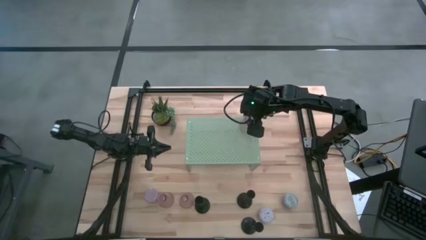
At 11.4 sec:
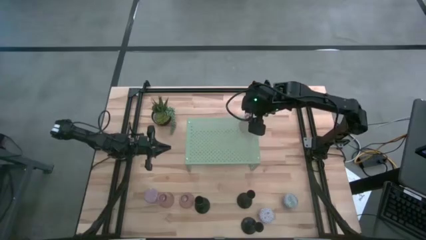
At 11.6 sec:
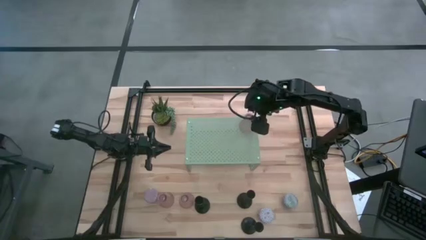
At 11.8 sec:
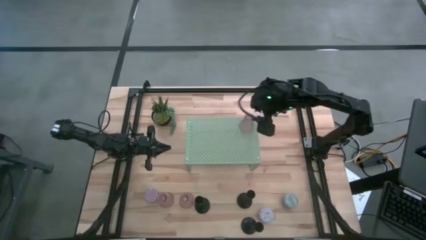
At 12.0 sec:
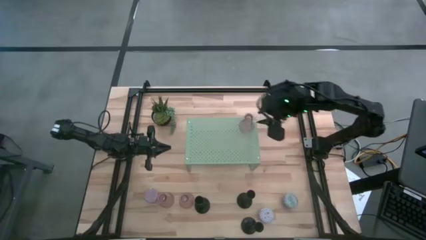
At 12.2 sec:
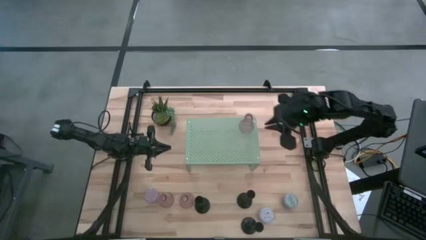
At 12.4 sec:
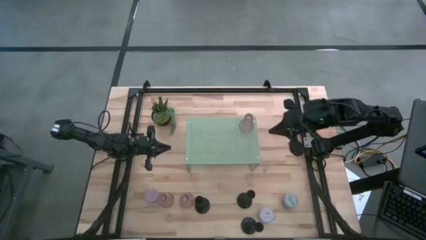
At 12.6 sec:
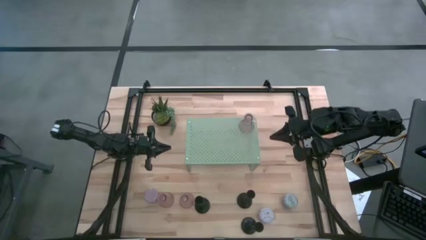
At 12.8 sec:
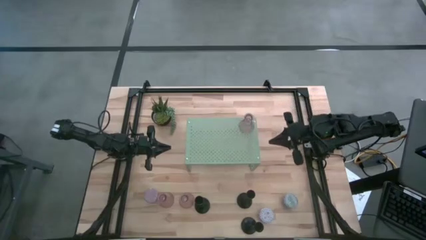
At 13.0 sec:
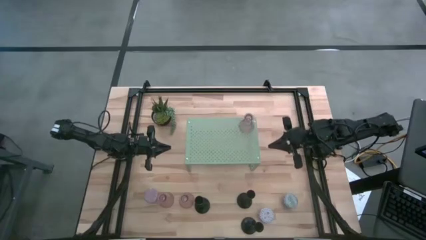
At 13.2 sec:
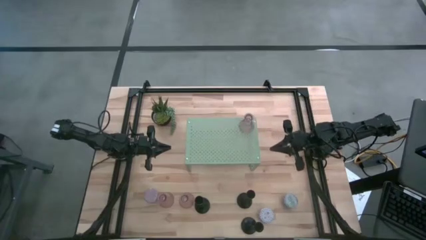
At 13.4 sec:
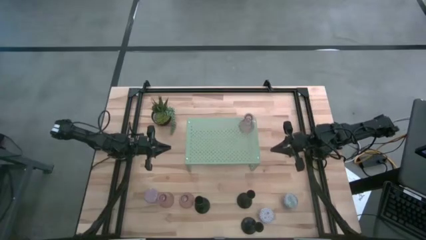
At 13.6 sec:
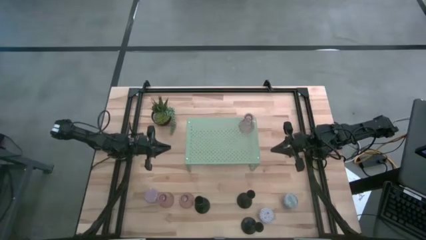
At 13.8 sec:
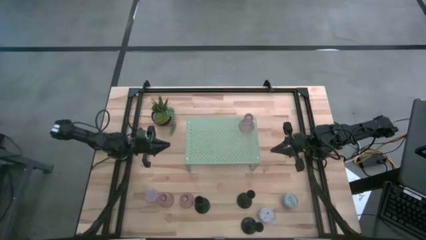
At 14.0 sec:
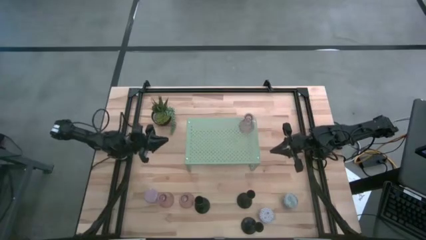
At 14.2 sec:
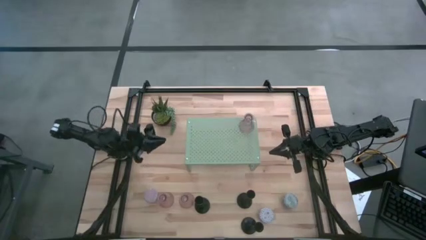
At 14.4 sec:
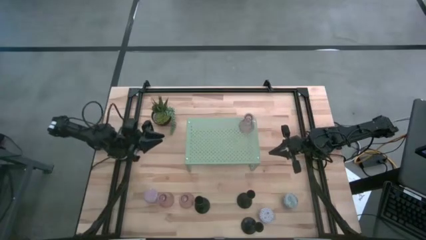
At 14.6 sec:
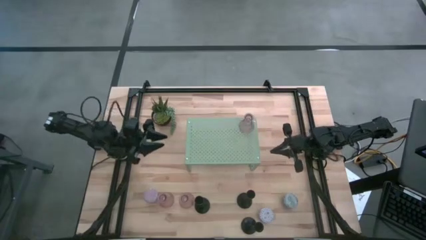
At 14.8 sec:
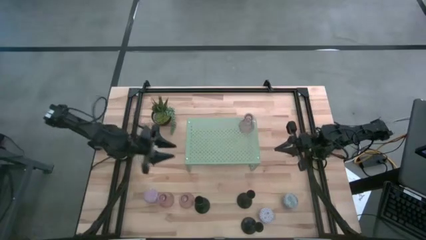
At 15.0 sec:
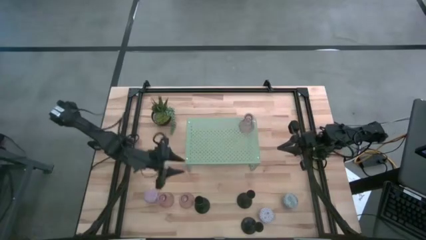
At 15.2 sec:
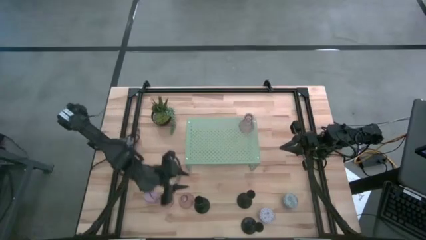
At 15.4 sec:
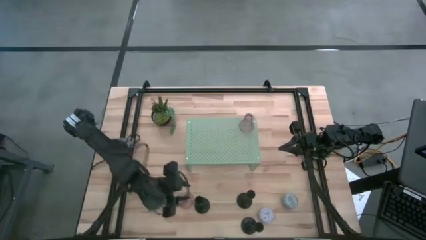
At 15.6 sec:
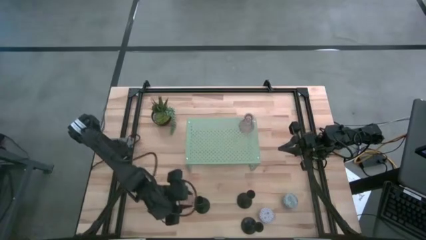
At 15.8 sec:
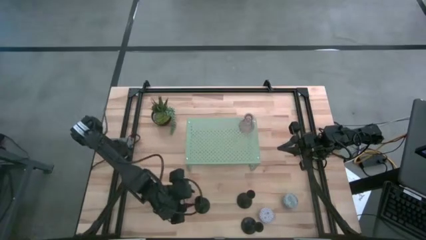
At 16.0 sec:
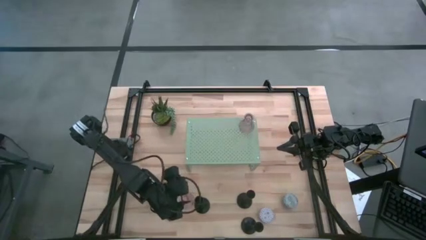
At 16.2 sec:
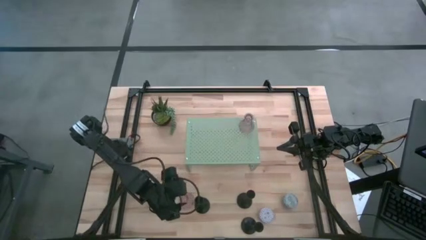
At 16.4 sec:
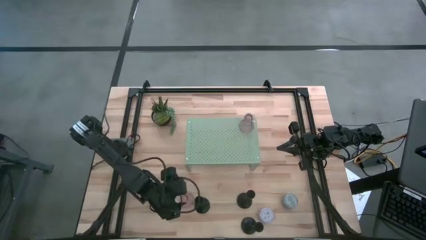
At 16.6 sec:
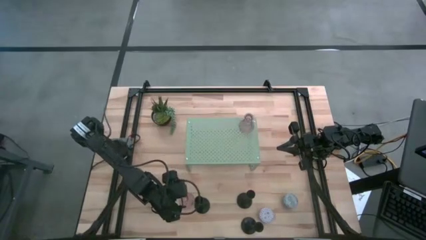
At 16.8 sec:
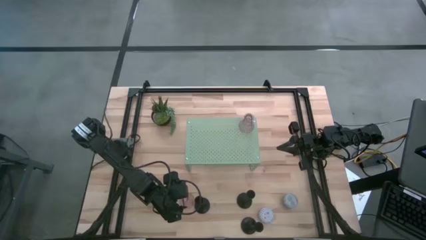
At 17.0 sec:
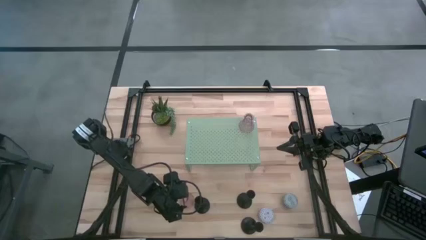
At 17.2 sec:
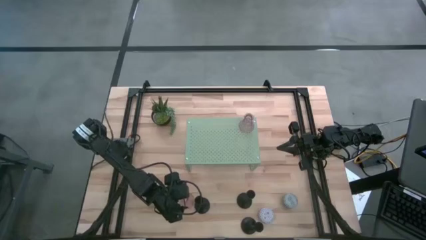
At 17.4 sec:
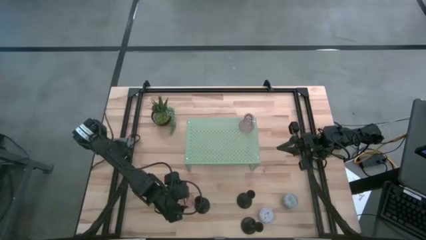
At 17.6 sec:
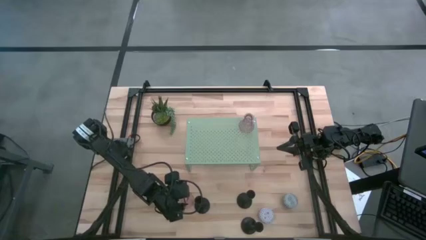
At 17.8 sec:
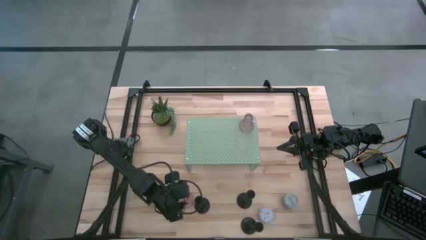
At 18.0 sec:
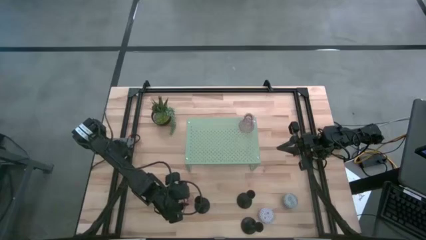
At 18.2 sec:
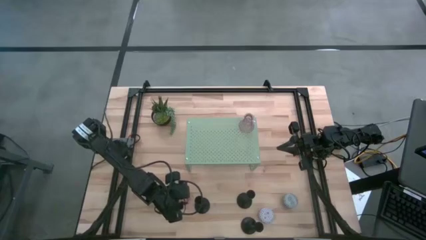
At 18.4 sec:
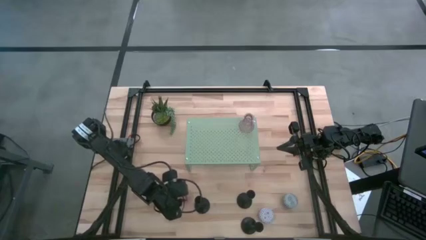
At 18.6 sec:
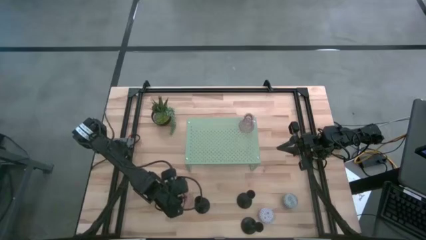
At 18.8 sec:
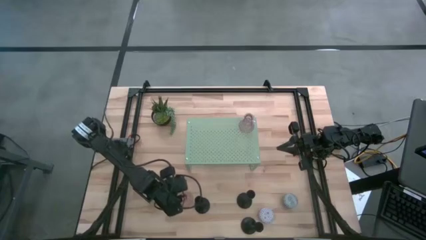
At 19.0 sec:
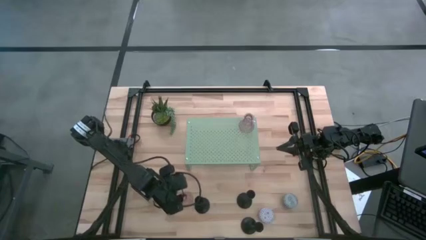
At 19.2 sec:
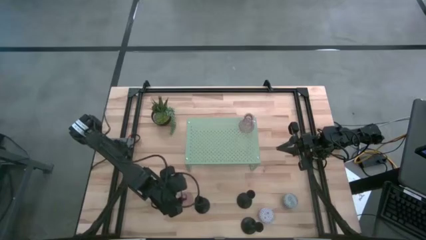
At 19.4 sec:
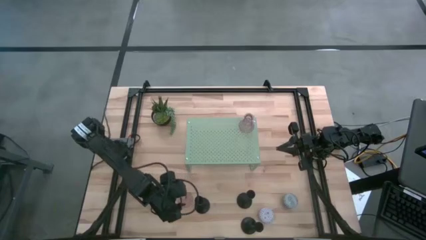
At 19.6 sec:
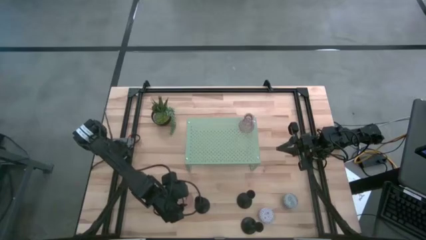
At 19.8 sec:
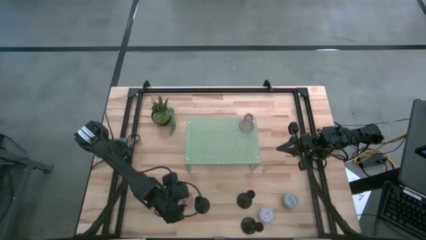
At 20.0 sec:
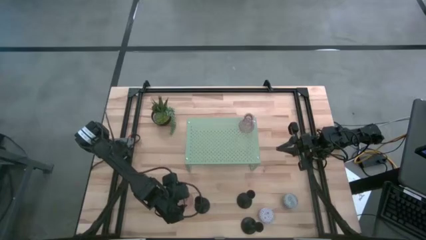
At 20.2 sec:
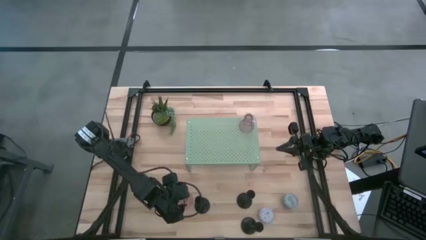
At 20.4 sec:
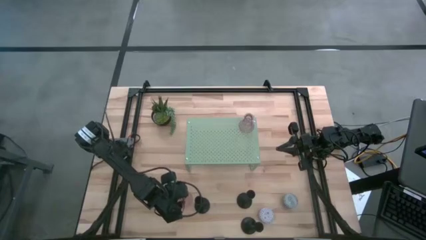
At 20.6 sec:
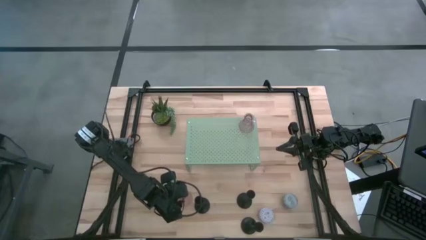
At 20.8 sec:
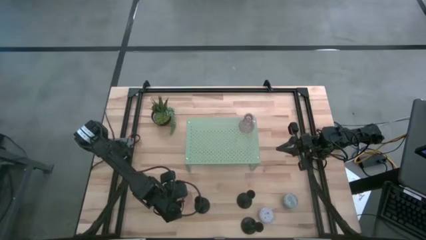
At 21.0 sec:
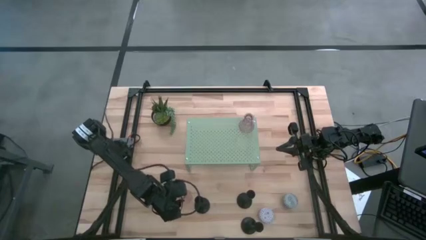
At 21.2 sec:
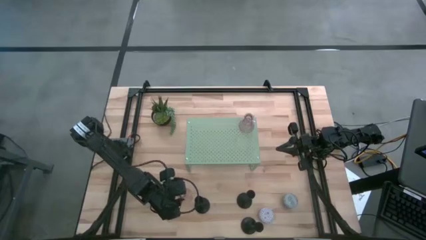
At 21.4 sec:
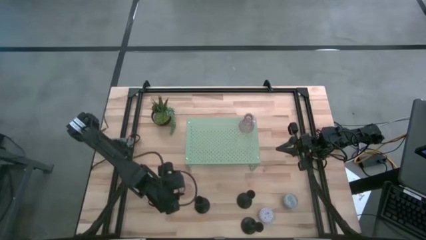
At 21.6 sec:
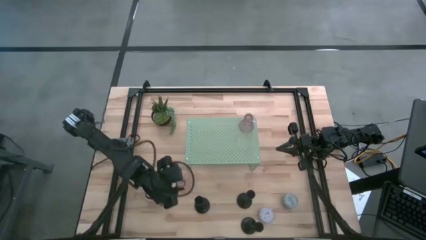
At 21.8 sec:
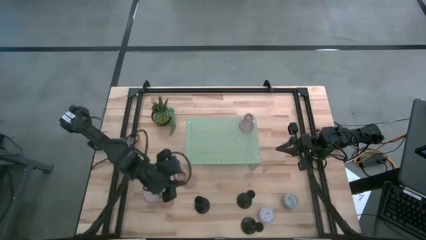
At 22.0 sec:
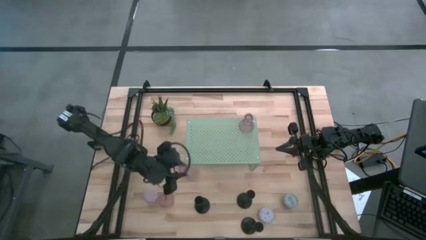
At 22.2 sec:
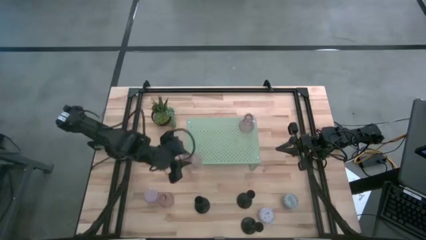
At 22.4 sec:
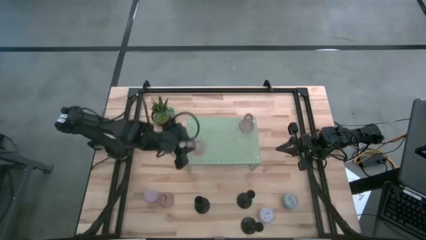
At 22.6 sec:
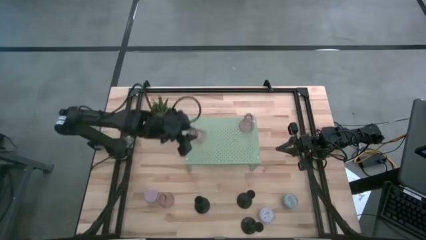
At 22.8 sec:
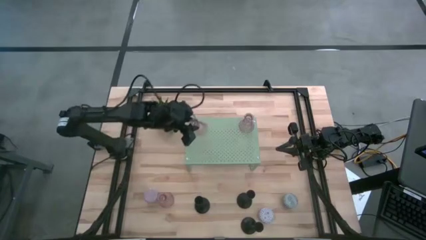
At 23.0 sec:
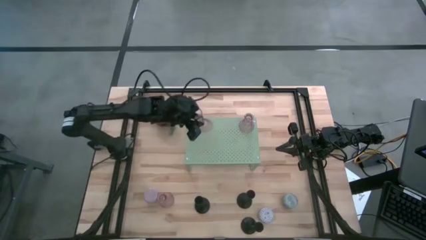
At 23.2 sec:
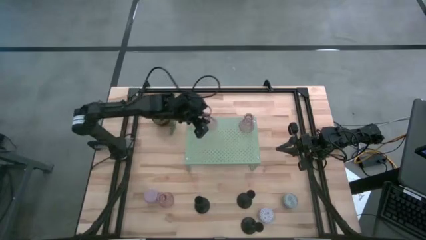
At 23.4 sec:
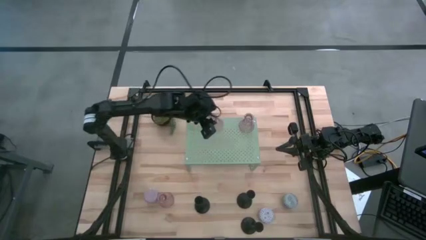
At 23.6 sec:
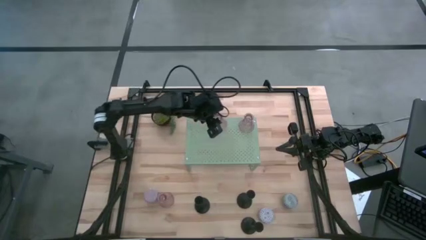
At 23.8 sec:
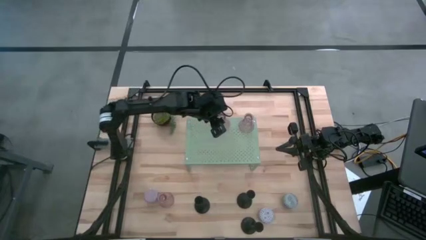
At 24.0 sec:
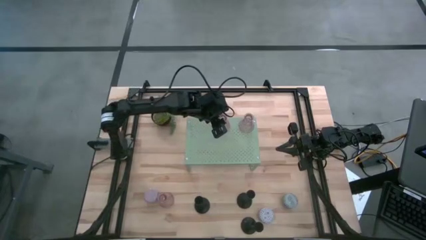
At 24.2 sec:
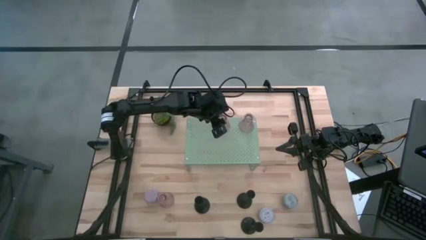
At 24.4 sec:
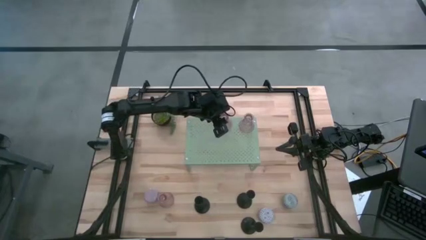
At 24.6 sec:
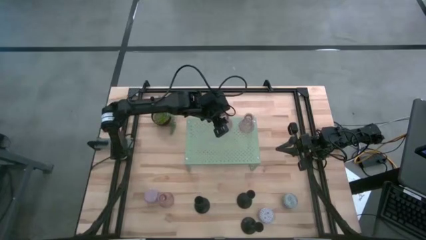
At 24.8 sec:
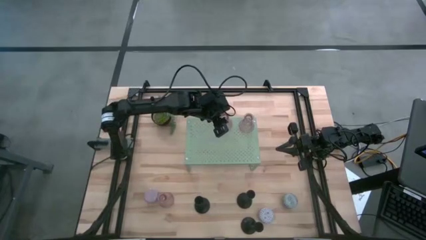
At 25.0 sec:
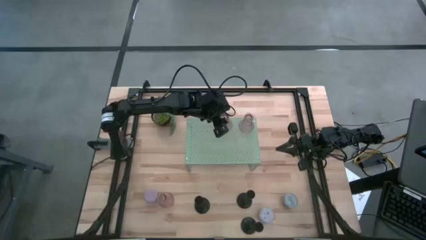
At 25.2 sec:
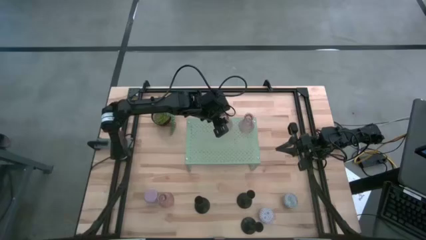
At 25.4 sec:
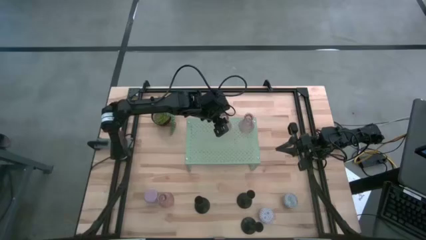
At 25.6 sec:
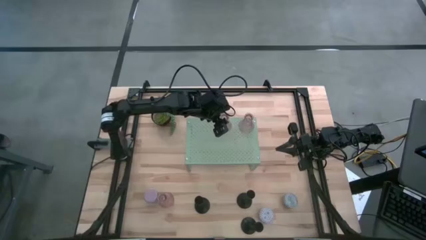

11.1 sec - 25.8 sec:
Task: Pick & Place candle stick holders
Put the right glass candle holder on the shelf
